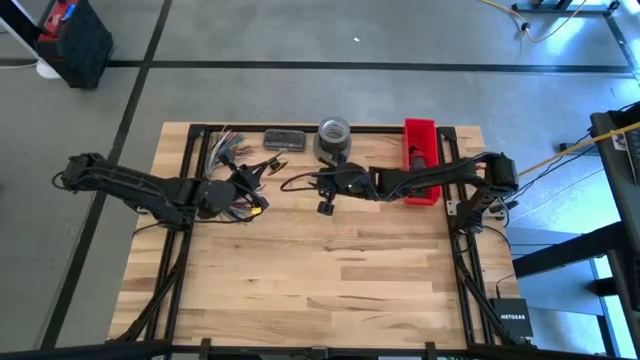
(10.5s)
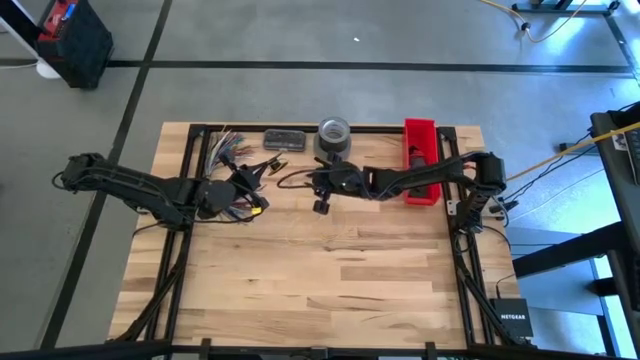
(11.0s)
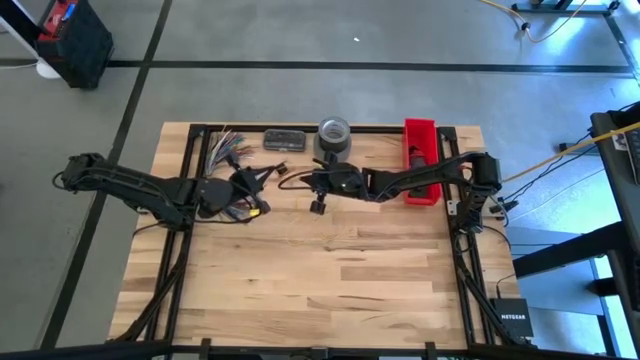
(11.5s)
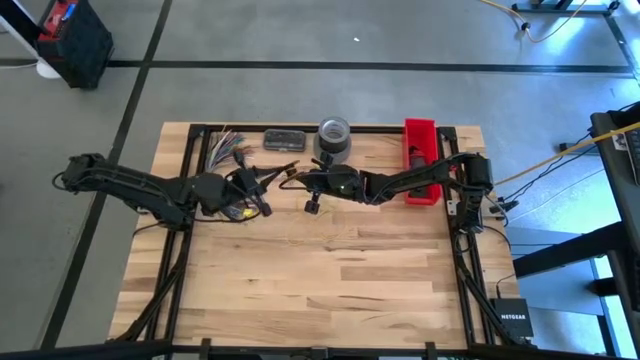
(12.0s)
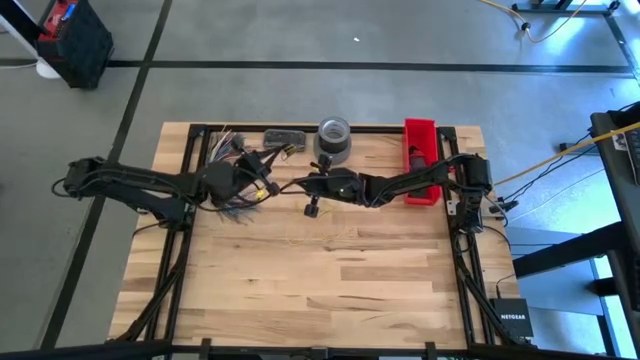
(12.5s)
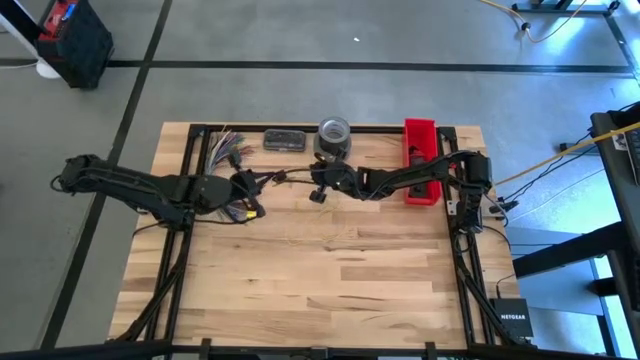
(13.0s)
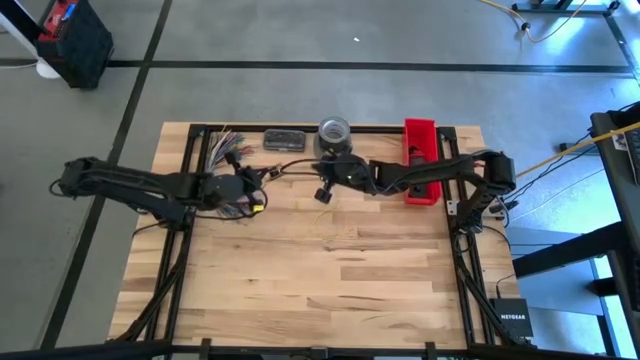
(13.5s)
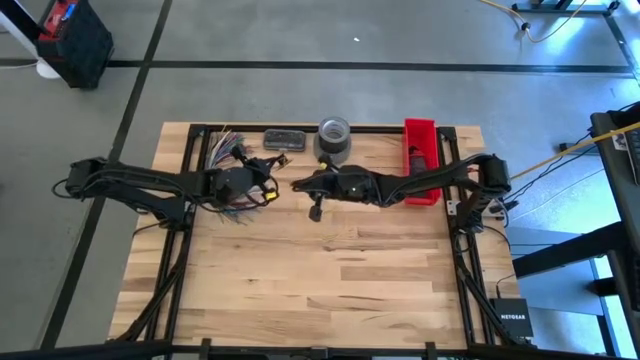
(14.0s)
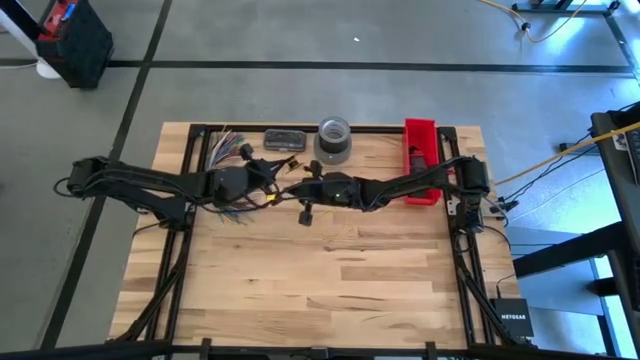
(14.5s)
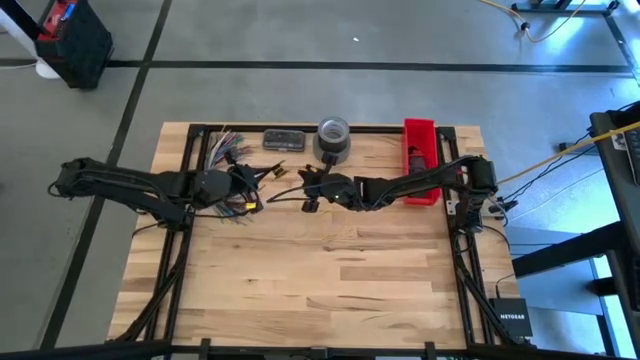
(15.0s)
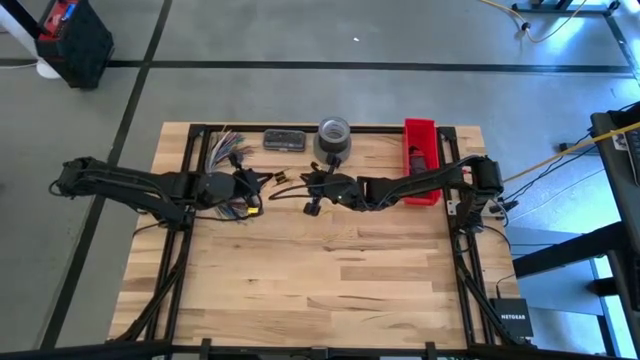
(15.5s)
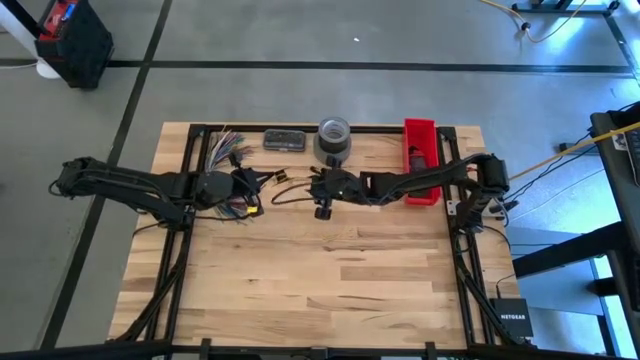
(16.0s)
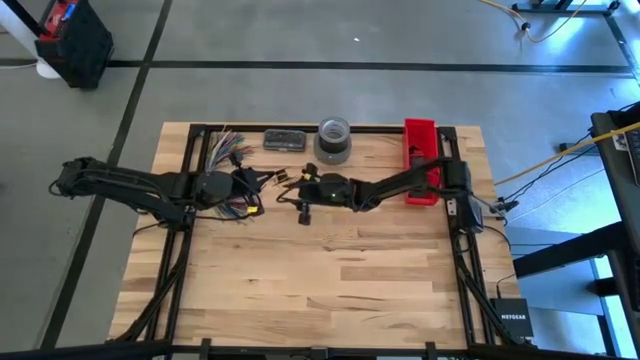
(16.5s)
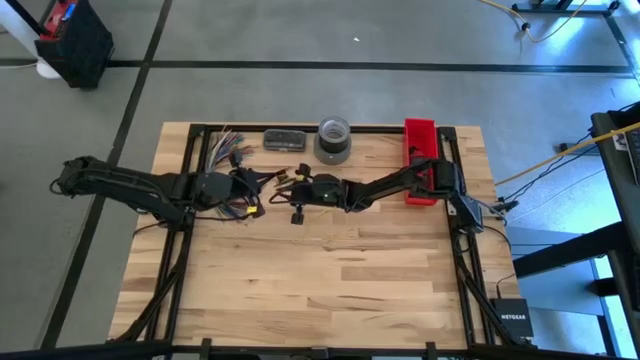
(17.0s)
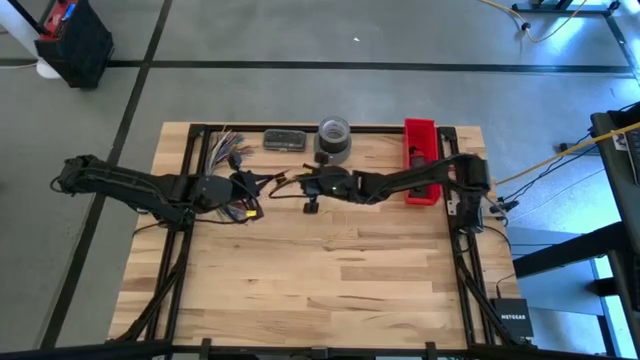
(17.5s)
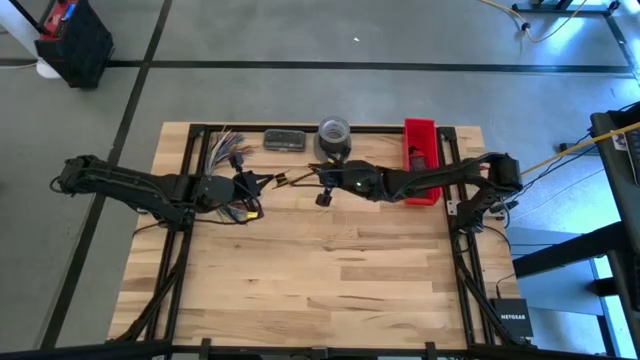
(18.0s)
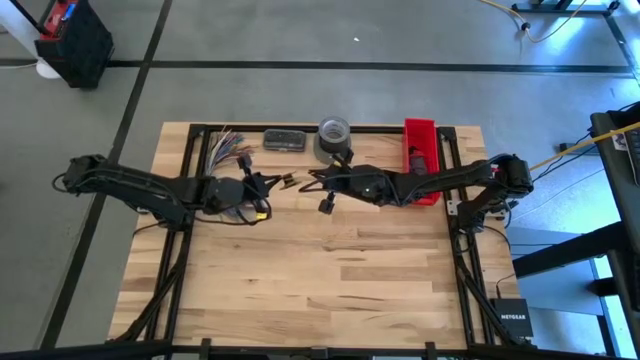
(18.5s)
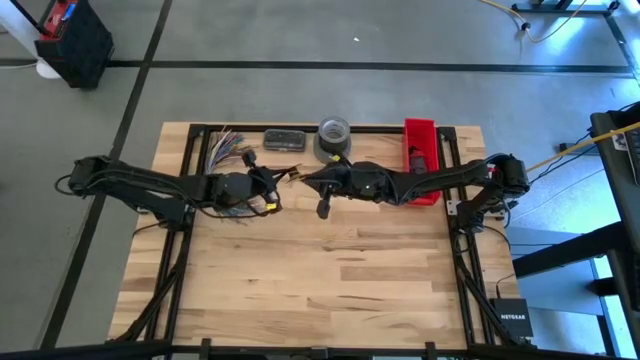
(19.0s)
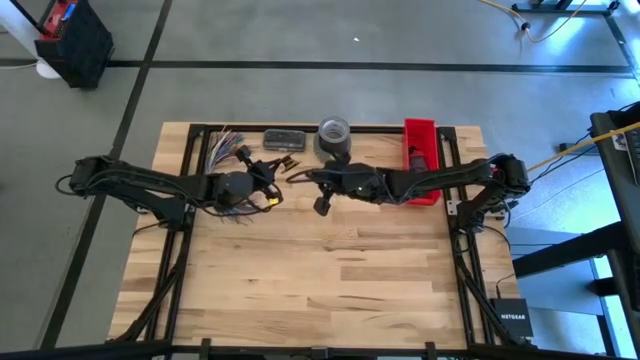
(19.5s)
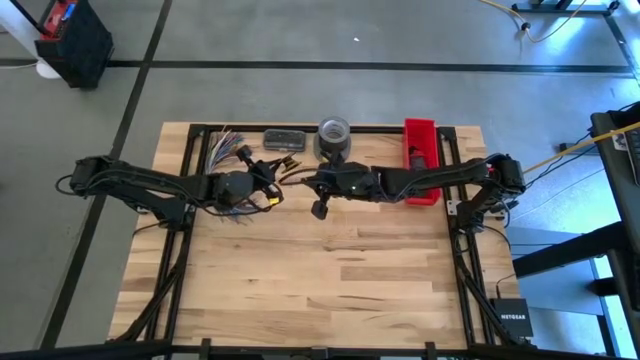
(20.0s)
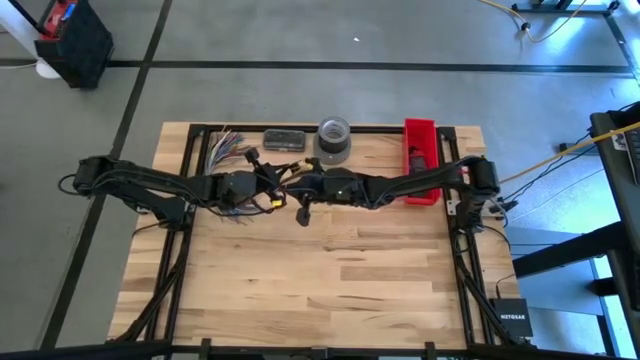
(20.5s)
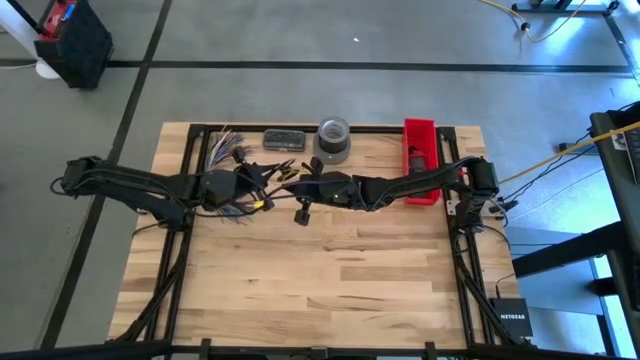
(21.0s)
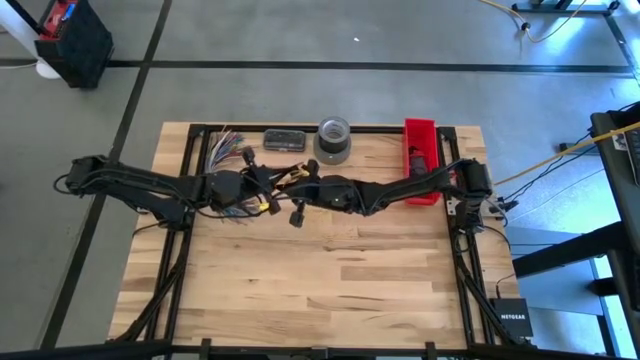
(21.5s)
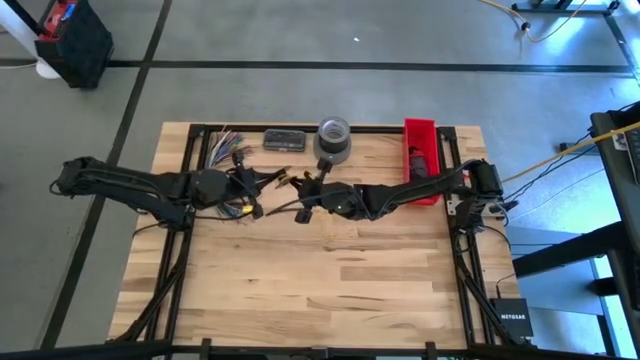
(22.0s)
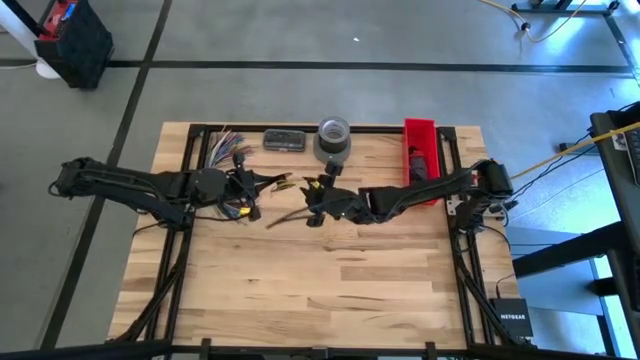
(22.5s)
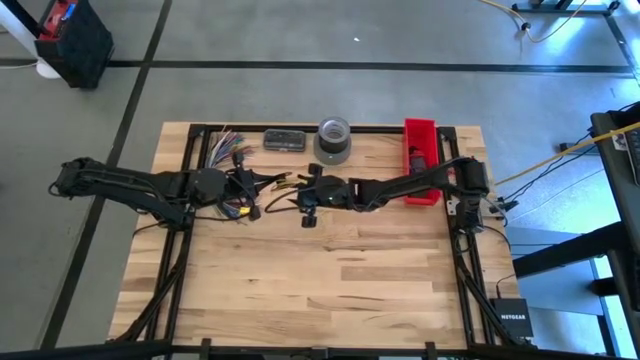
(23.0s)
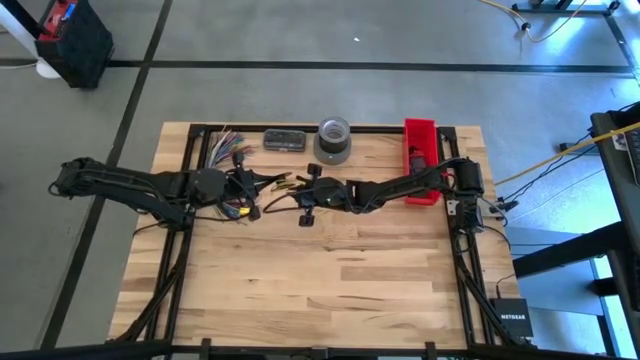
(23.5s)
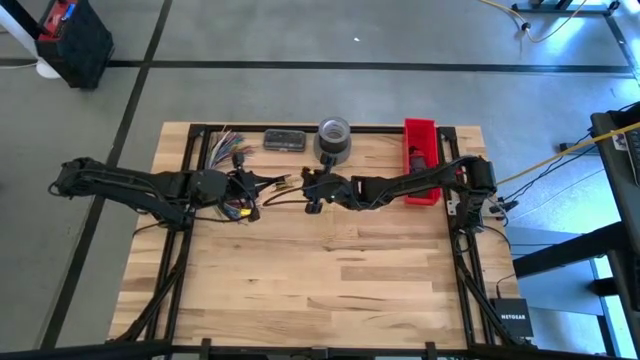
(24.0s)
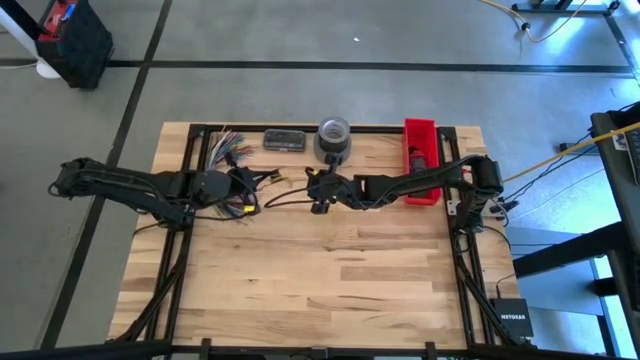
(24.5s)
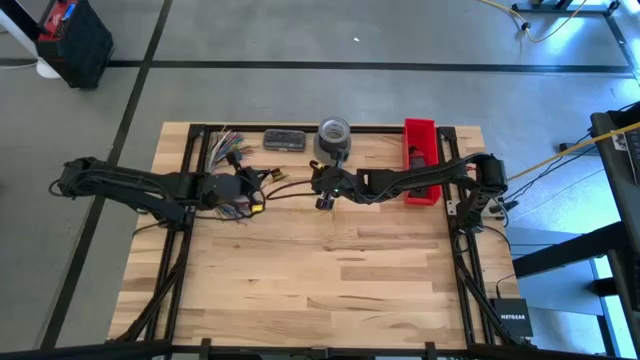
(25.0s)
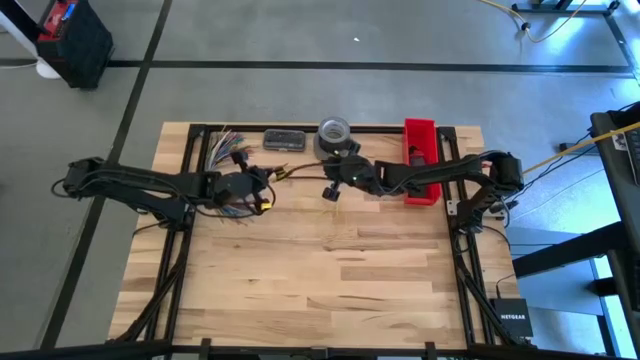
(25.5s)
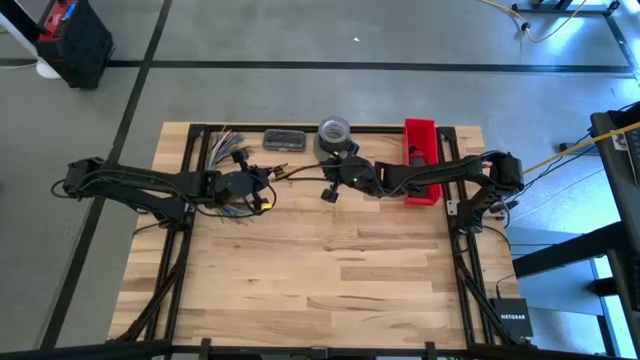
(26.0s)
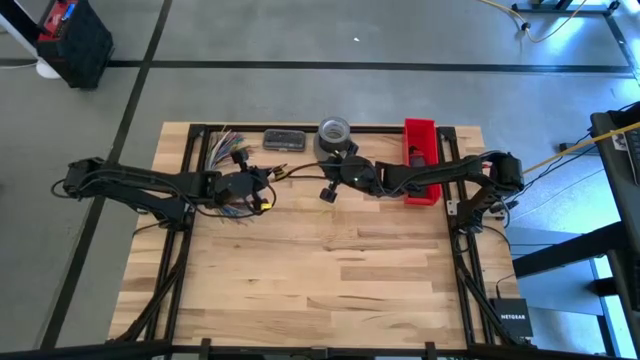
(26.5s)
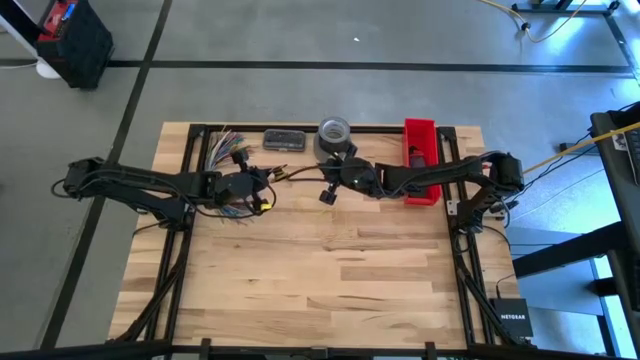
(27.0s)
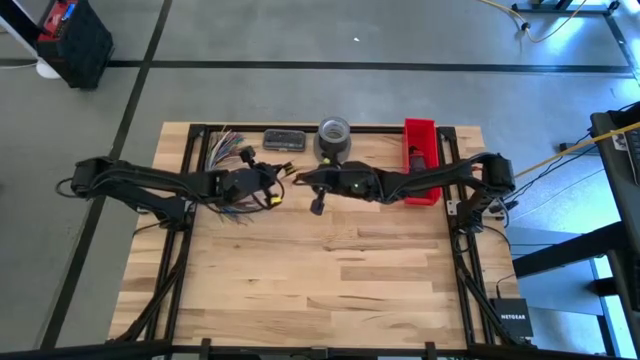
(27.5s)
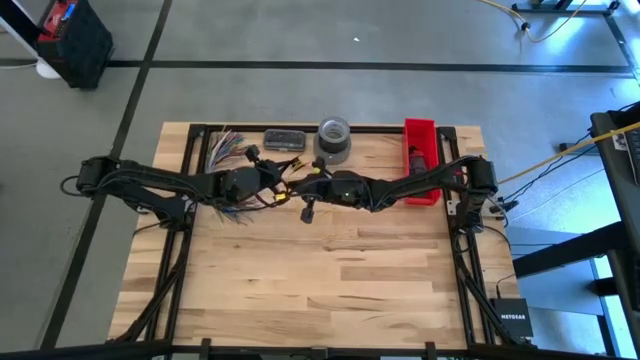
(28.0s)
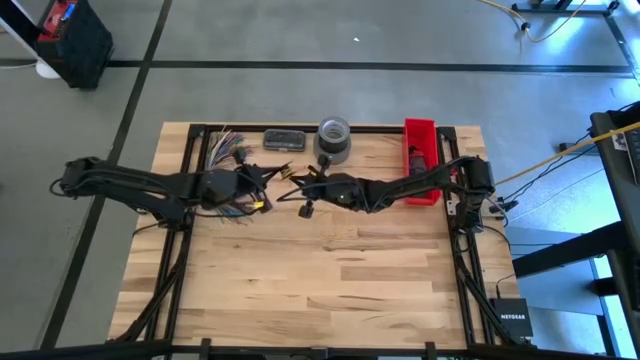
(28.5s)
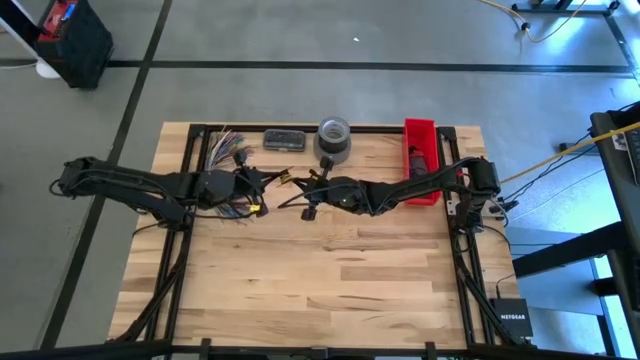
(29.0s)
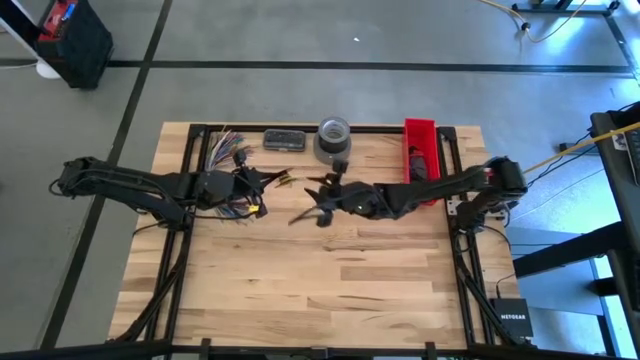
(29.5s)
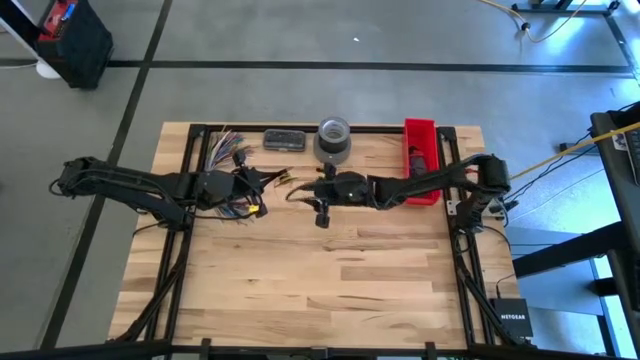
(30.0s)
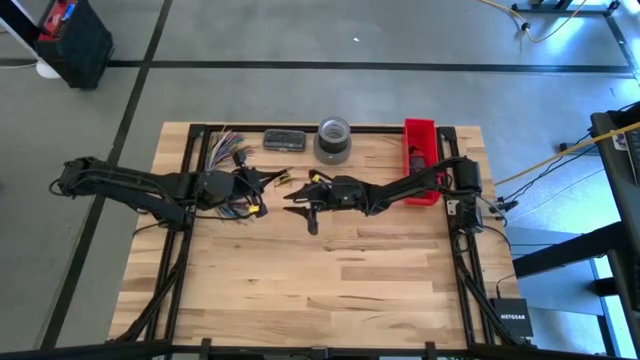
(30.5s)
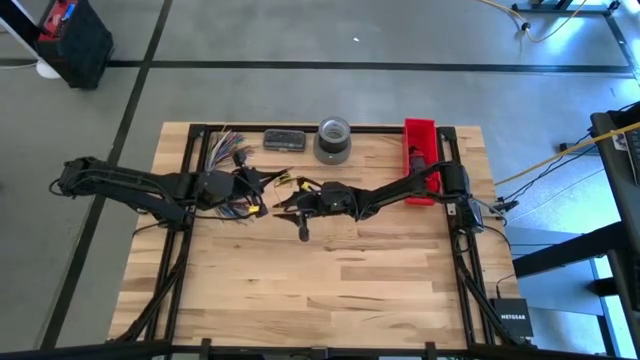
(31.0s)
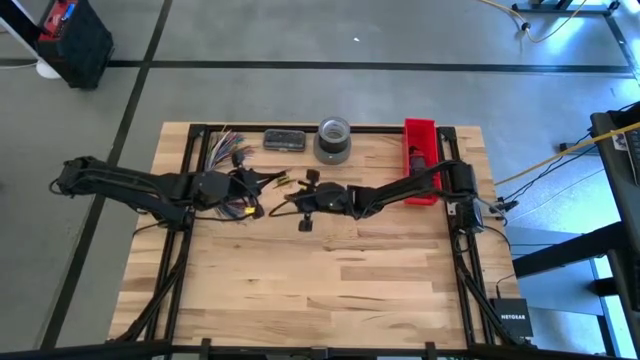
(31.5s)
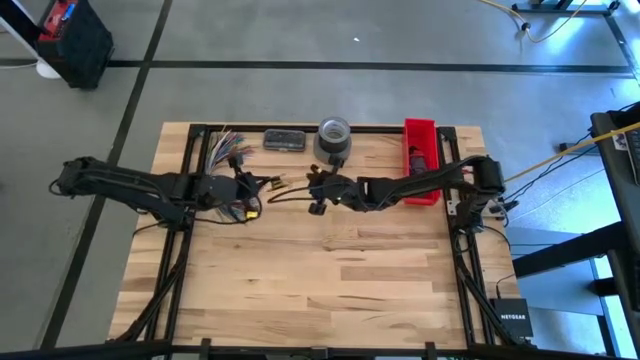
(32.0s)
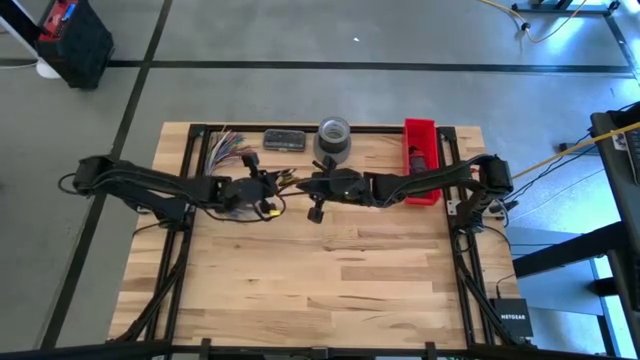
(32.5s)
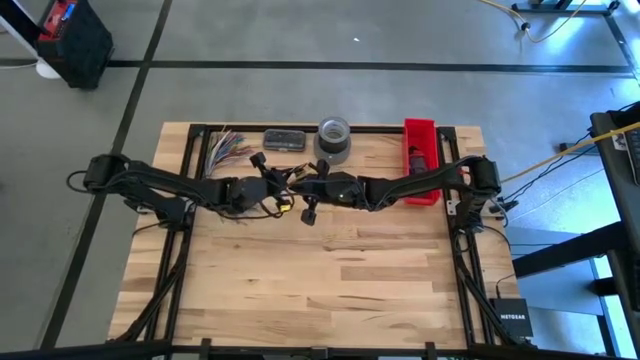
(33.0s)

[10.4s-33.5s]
Task: Coil cords
Coil the yellow wire on the spool
